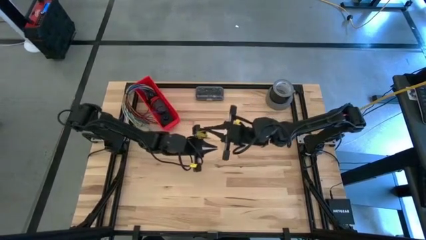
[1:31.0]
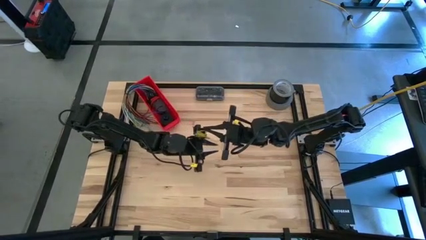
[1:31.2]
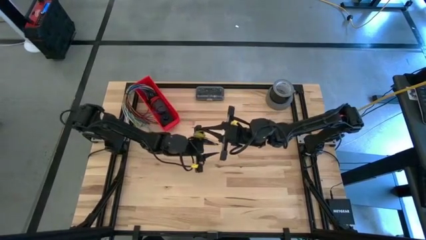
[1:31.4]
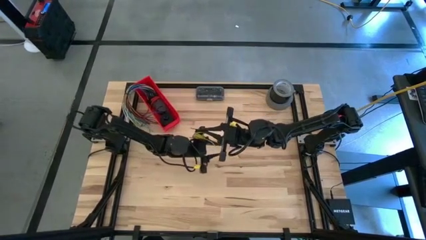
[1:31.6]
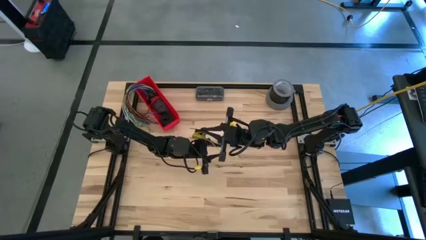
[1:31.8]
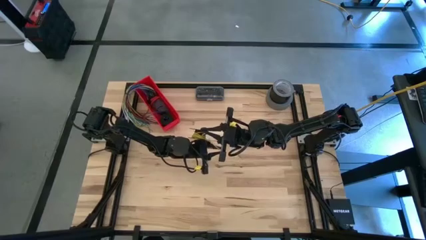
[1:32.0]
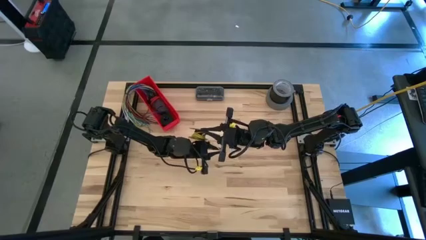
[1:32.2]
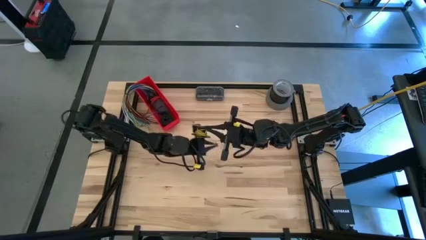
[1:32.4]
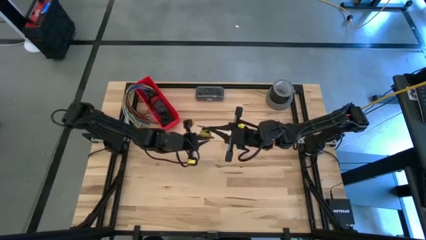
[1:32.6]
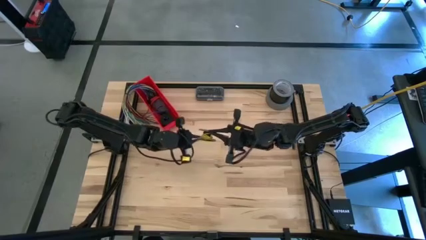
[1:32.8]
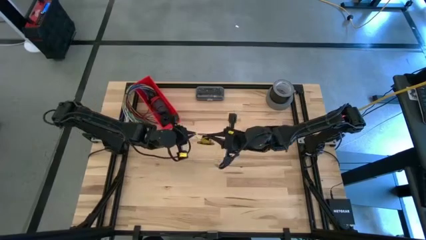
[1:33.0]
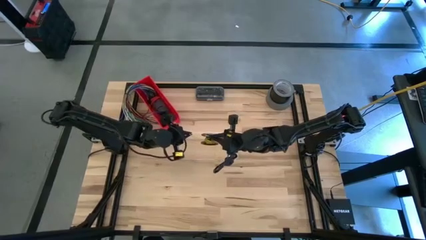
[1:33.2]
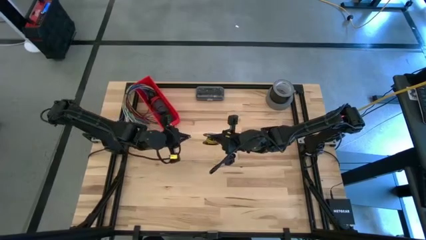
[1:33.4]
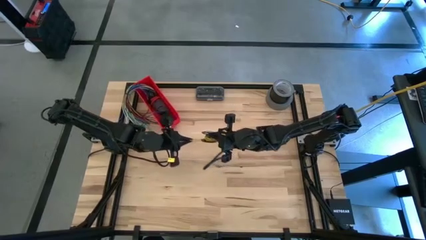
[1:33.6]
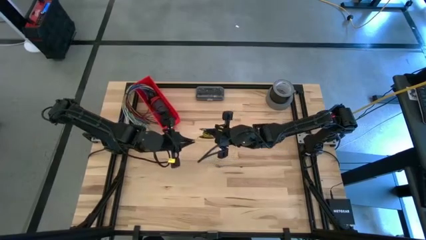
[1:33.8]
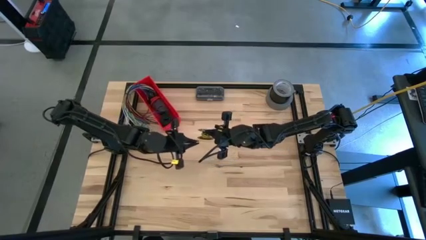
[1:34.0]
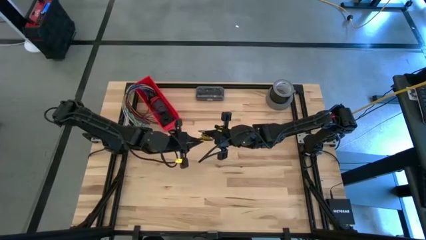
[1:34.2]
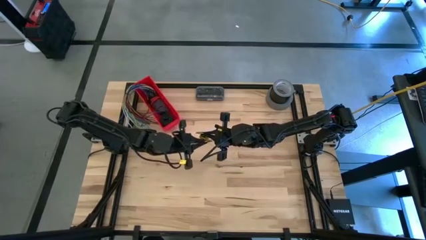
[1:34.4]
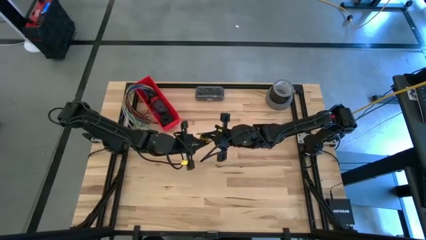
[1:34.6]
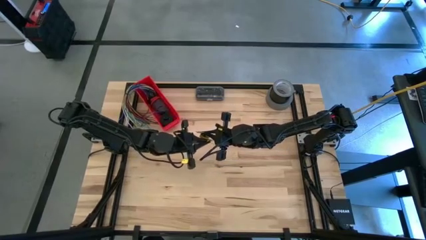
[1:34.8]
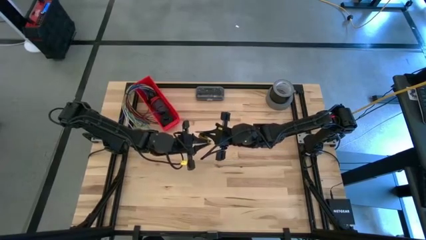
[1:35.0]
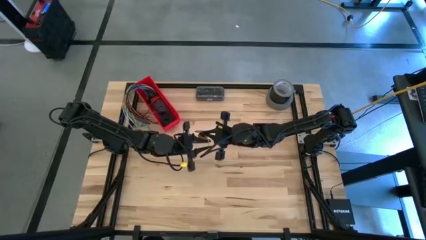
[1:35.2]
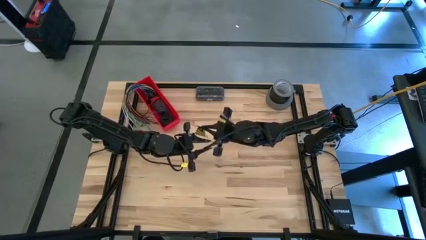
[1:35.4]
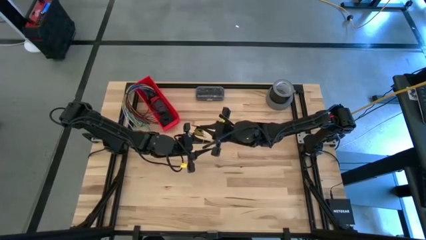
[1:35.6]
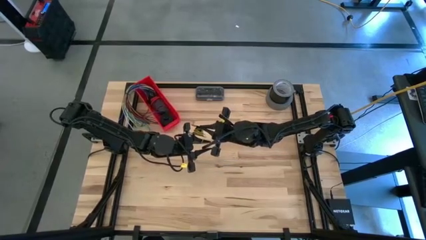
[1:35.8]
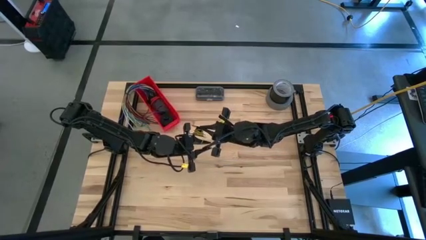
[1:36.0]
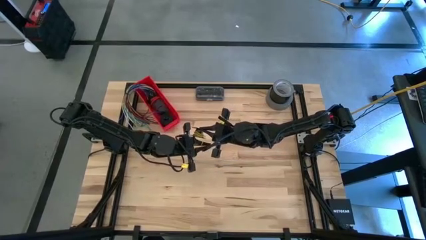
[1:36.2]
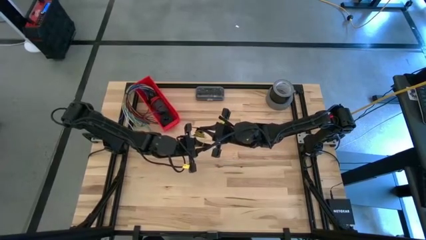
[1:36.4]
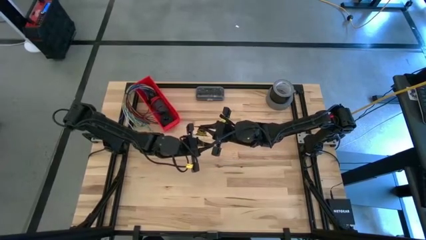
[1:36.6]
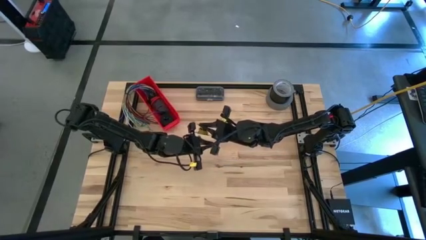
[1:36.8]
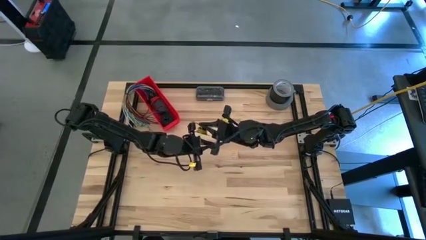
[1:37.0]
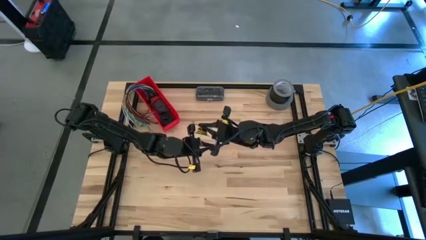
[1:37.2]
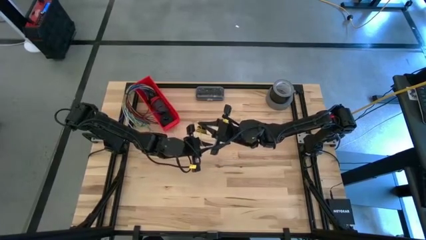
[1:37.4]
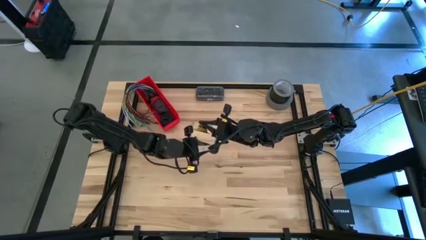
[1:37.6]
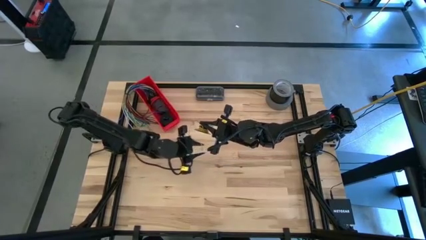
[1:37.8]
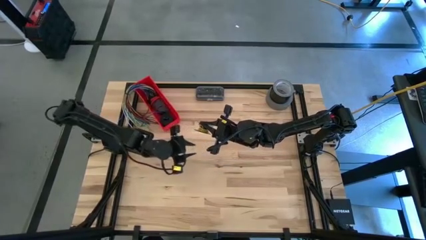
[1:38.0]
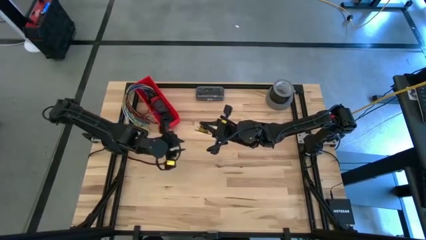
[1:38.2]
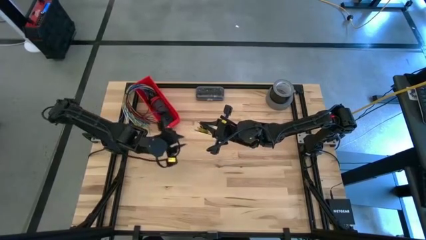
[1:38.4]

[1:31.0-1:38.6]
Task: Coil cords
Coil the yellow wire on the spool
